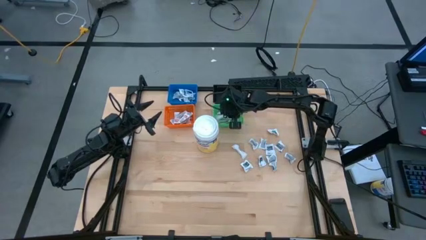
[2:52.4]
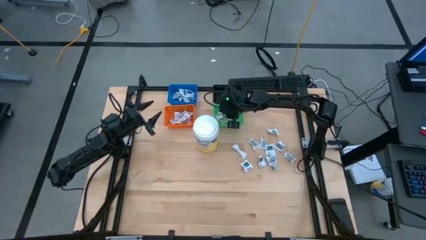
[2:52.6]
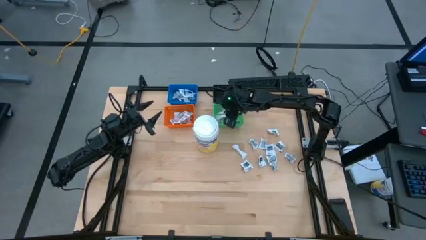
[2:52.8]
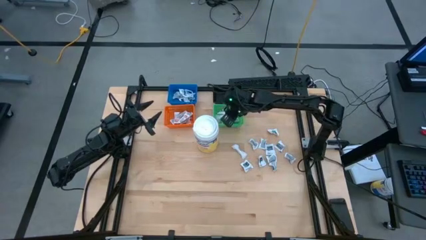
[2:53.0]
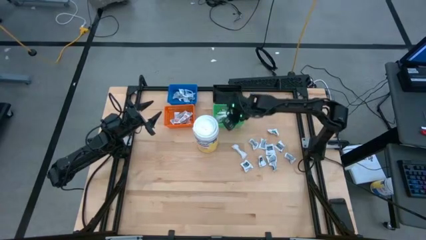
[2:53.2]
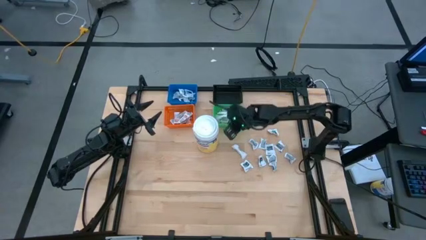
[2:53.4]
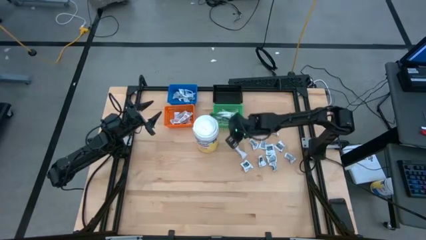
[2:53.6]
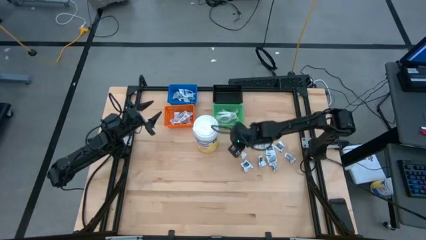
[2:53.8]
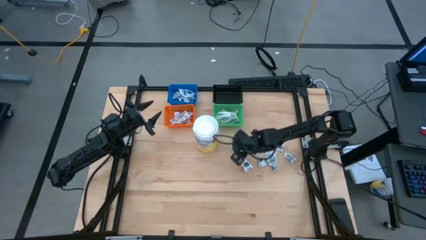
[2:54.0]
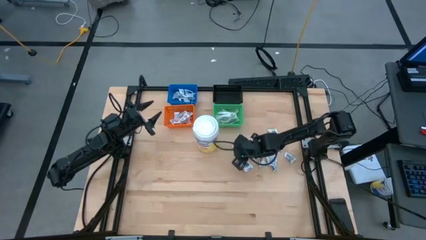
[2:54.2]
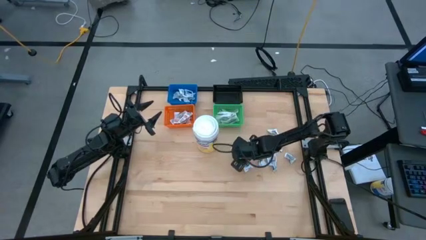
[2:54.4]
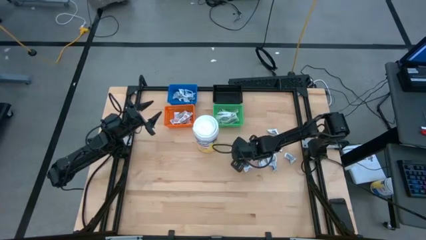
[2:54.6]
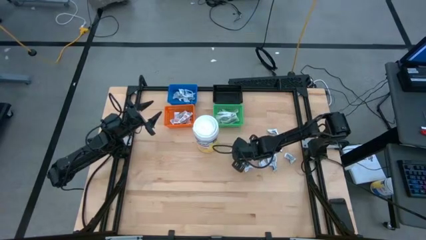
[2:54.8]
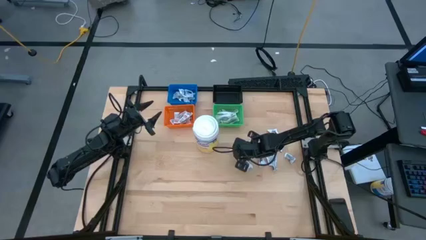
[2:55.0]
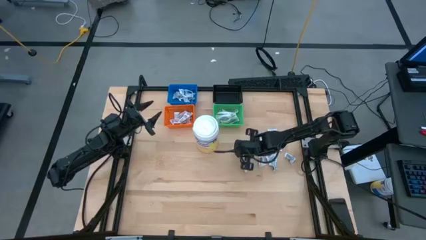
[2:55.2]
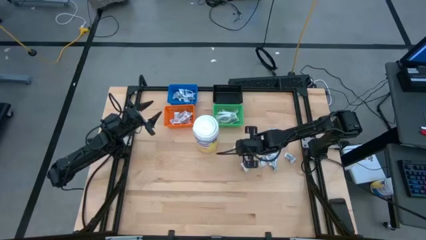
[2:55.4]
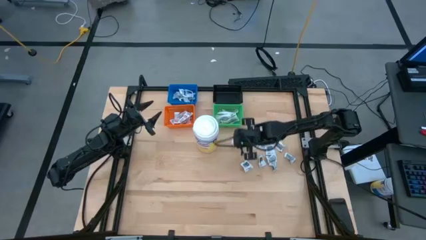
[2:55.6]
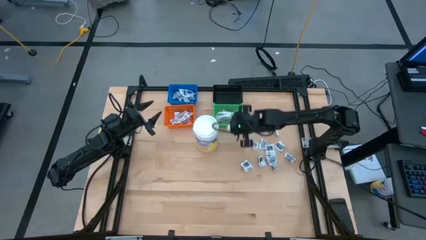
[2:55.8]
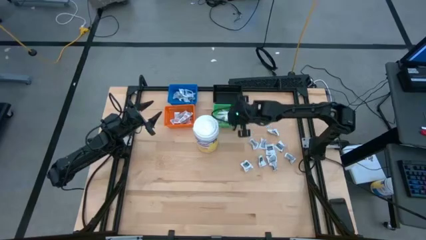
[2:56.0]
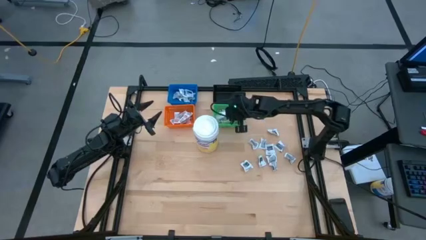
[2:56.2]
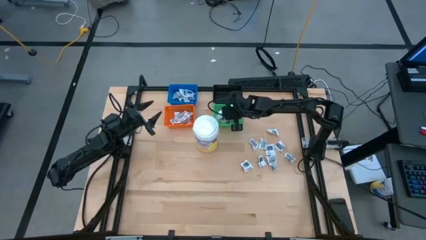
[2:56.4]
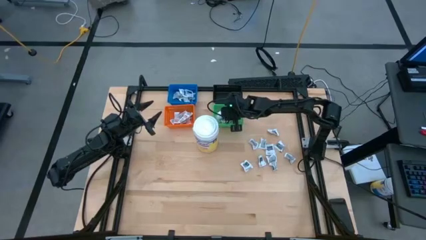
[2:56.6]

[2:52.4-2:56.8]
Task: Pick & Place First Aid Supplies
Put the green bandage into the green bin

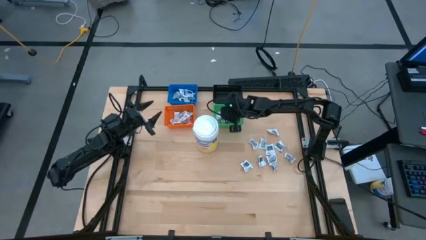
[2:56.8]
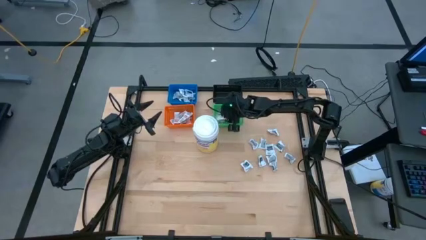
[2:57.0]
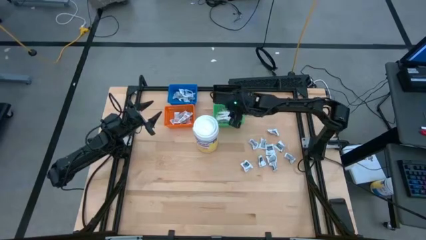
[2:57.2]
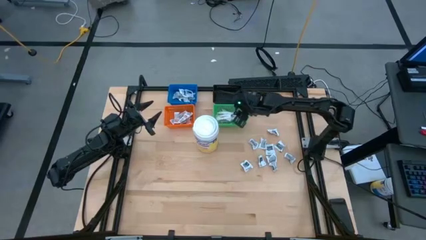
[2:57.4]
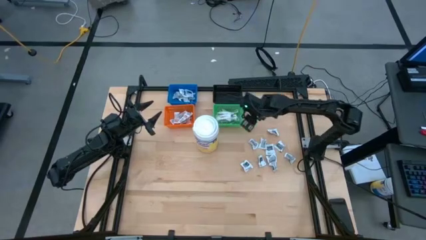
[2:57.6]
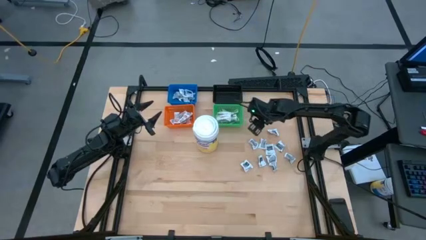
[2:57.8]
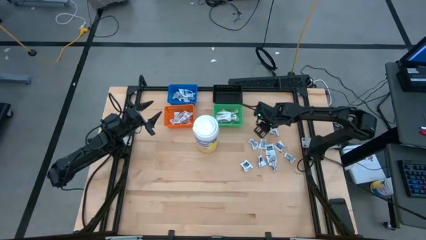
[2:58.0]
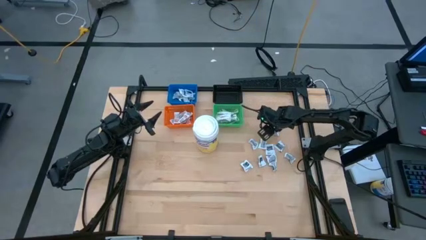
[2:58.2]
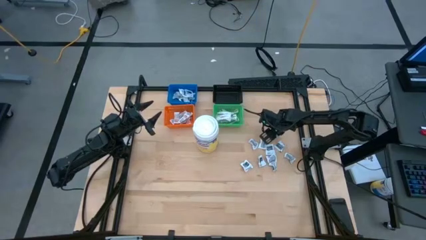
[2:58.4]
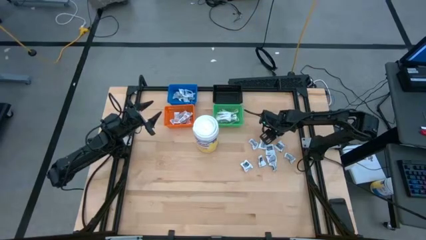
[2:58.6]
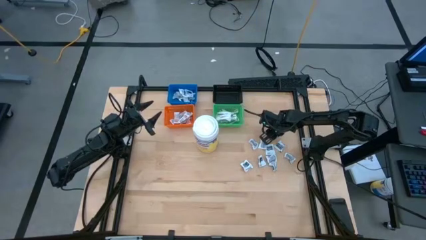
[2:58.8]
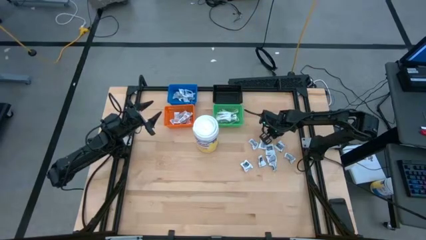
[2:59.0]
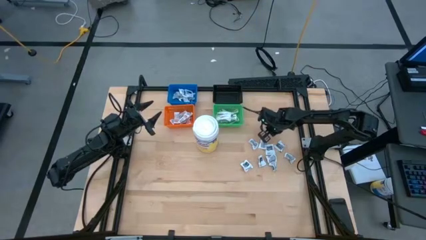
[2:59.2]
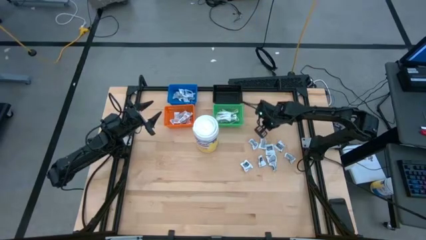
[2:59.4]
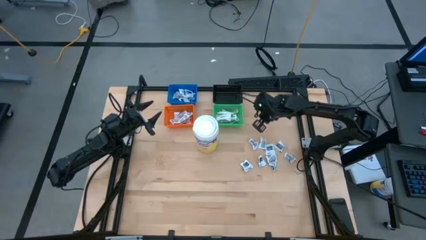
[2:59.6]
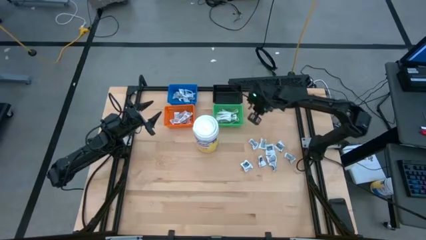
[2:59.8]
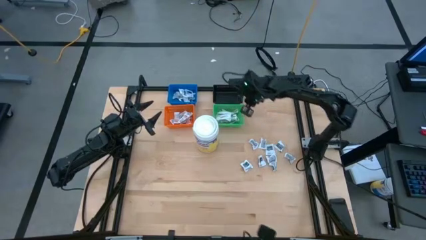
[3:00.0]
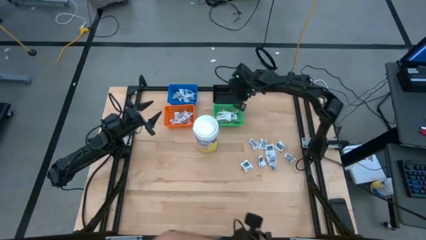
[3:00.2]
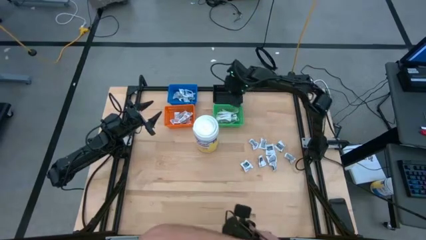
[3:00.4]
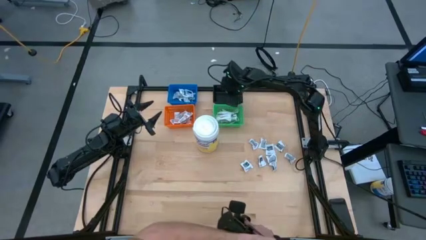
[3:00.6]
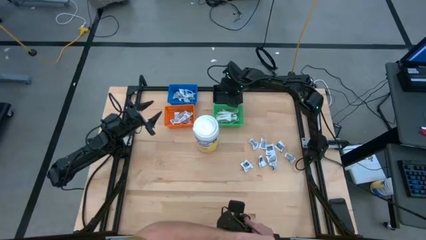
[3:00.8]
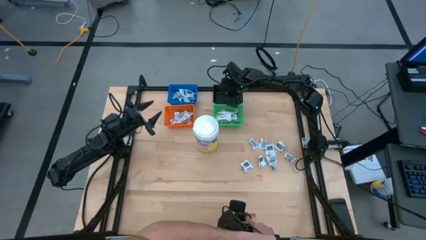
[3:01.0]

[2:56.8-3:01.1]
Put the black towelette pack into the black bin

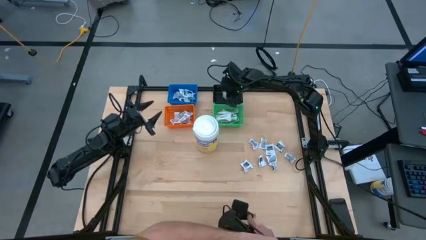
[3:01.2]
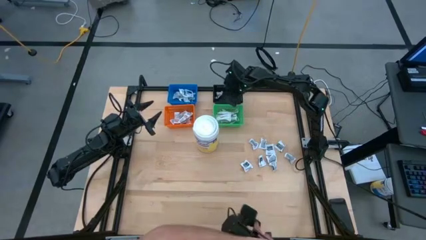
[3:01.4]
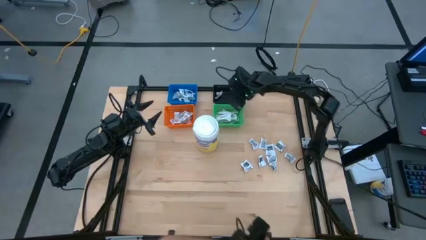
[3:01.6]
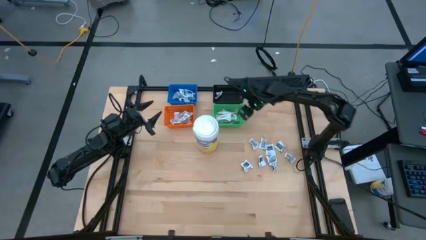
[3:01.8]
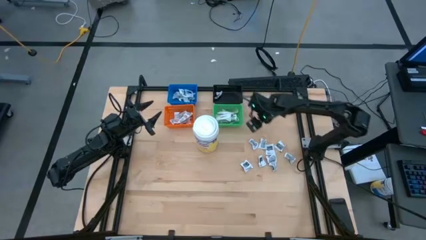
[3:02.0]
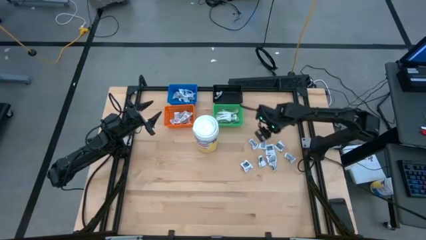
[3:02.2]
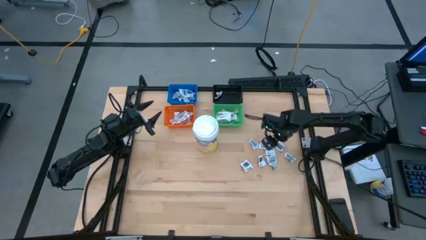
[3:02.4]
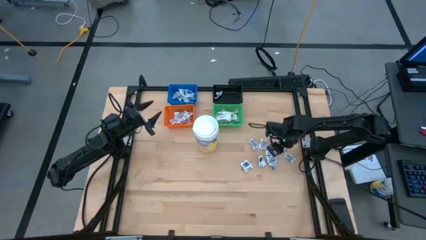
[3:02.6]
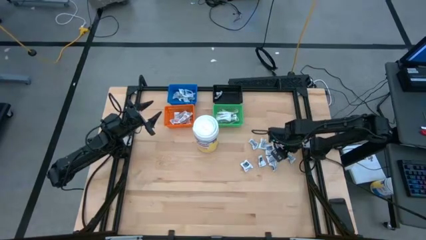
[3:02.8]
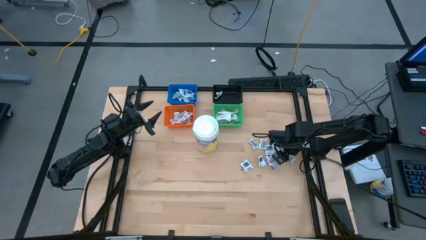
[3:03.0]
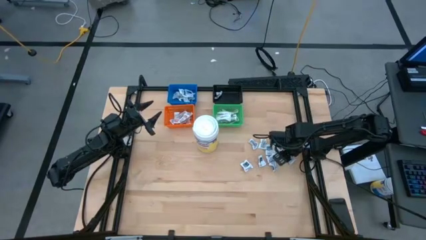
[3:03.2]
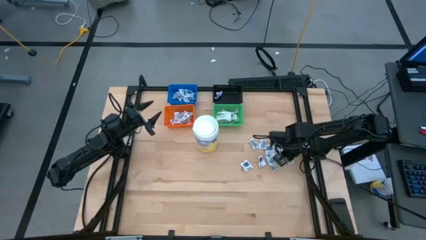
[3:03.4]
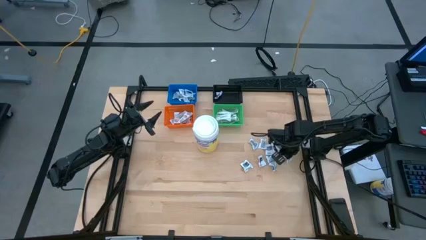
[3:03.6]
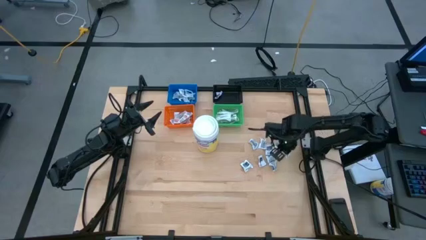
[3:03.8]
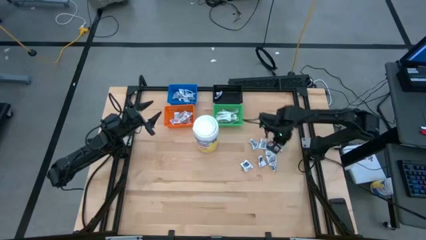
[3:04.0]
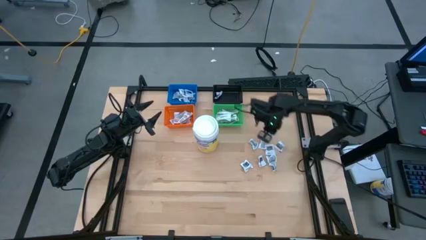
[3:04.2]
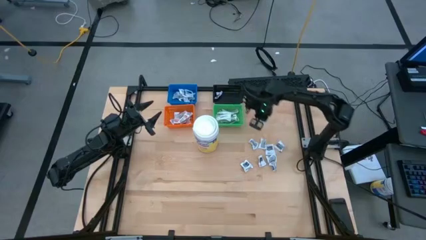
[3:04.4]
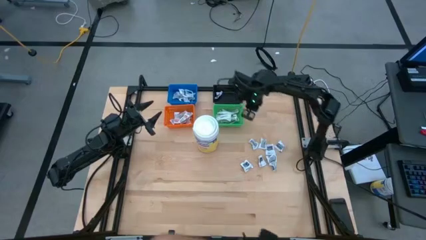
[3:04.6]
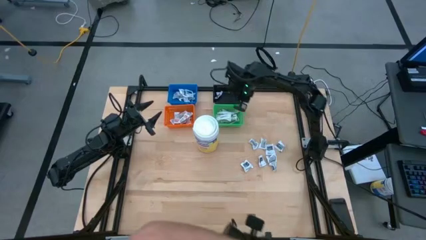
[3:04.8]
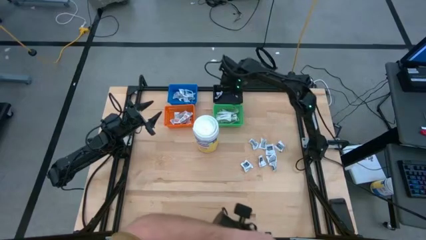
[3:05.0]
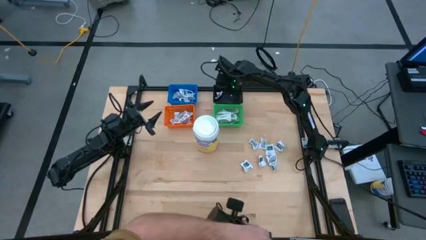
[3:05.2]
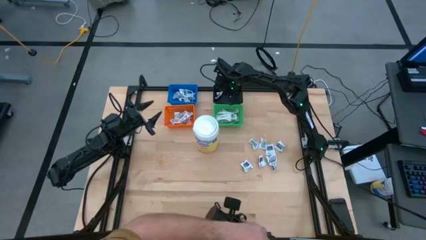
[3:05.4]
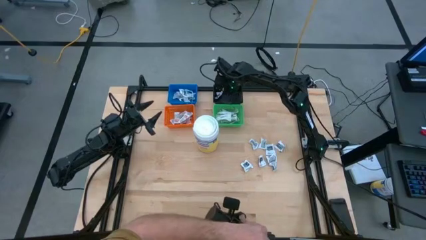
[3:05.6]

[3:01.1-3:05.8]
Put the black towelette pack into the black bin

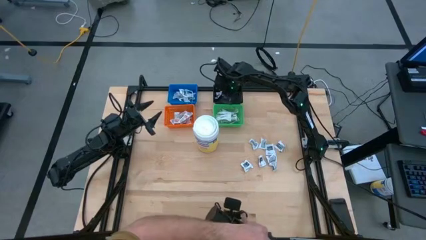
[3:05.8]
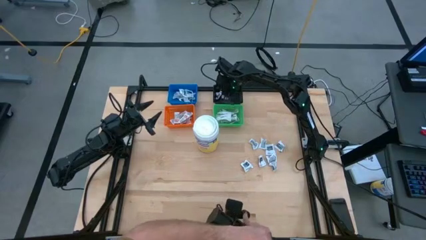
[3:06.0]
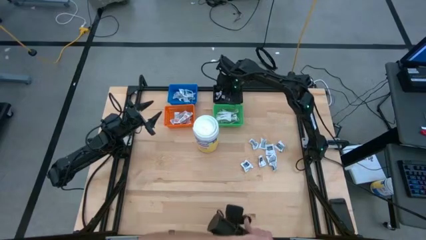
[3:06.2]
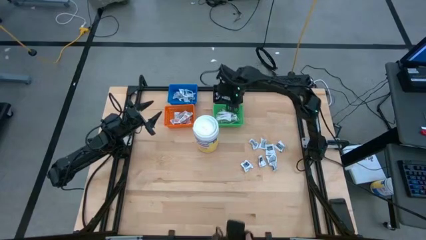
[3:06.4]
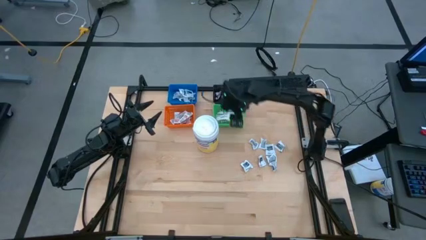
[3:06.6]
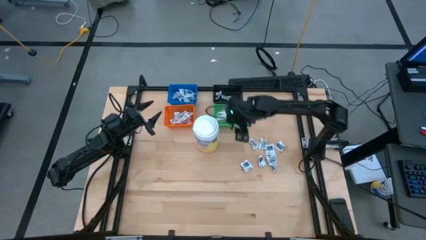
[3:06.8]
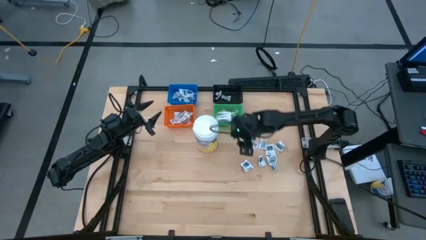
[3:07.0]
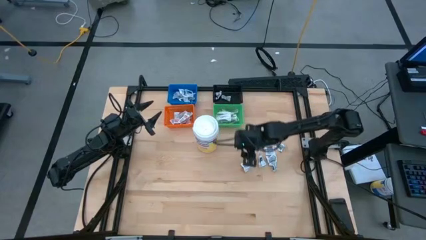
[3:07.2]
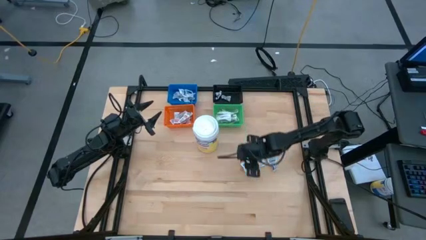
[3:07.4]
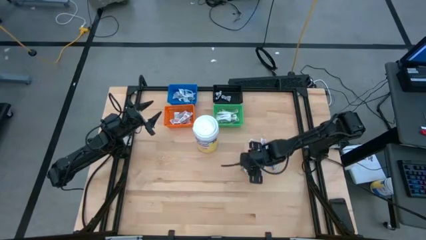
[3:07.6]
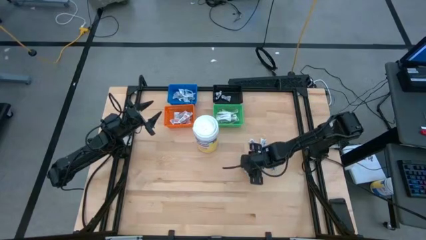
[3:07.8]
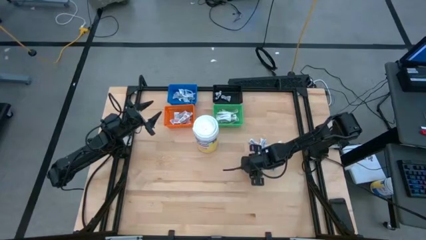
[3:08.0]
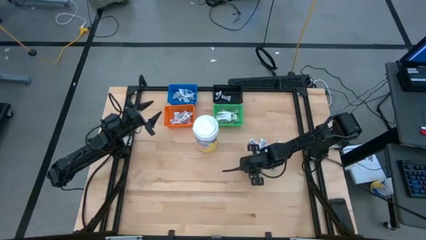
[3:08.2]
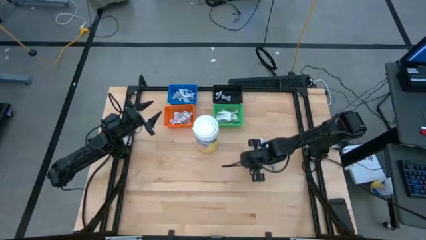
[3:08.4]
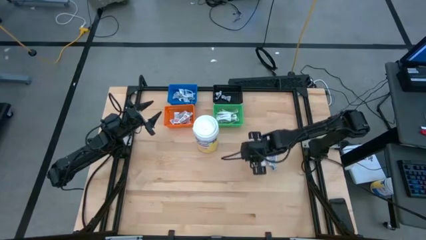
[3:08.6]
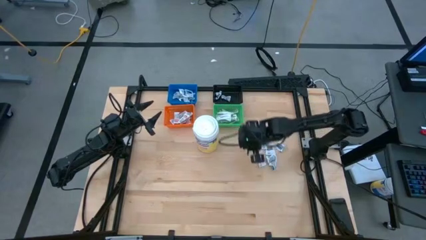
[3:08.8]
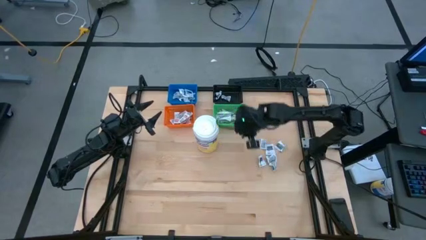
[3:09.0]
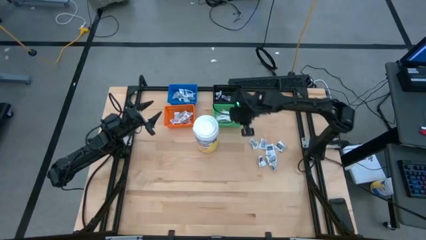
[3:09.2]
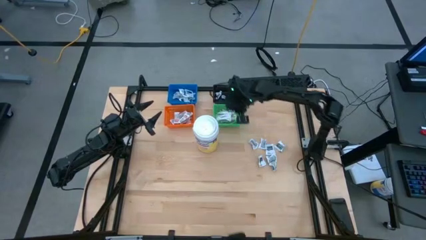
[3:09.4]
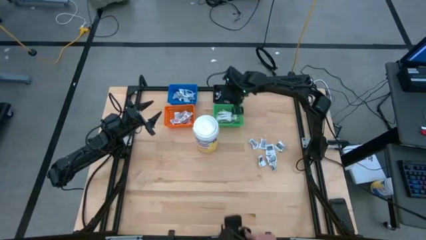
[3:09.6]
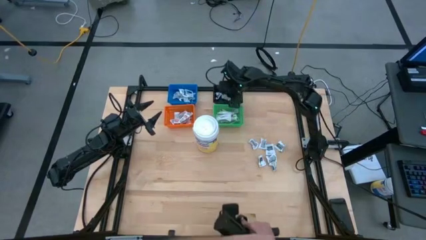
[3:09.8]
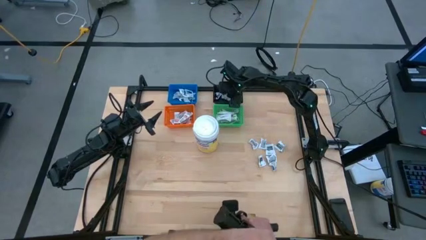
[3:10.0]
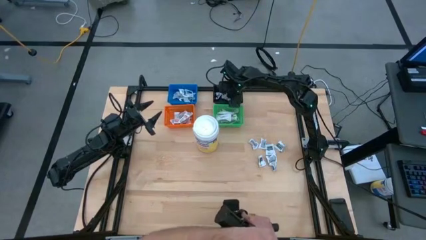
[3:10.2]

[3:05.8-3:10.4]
Put the black towelette pack into the black bin
